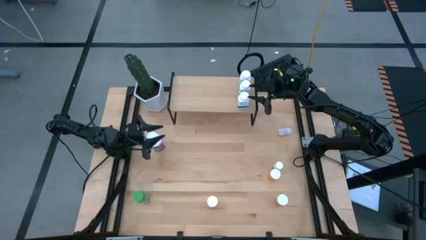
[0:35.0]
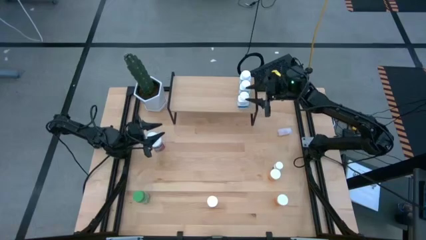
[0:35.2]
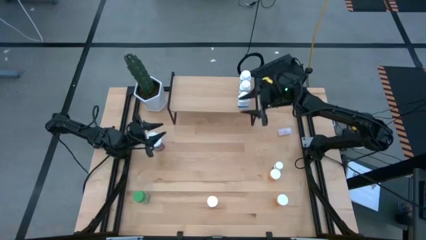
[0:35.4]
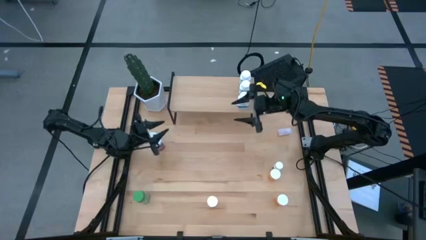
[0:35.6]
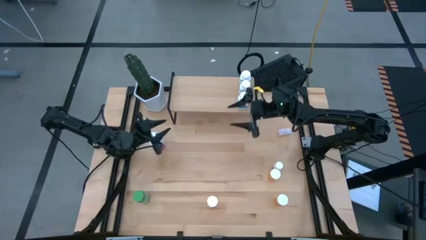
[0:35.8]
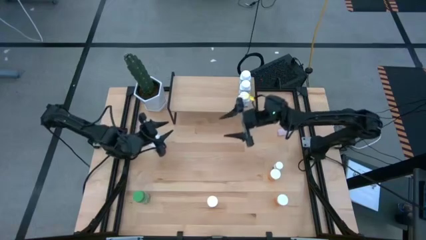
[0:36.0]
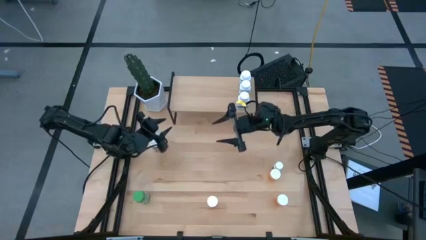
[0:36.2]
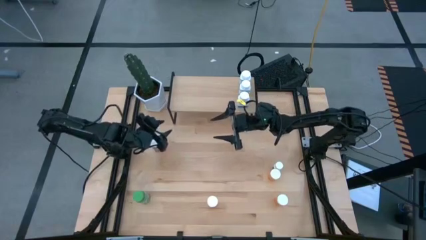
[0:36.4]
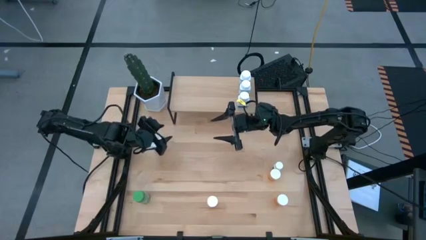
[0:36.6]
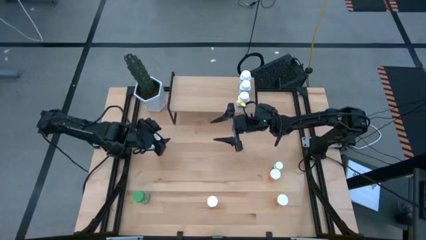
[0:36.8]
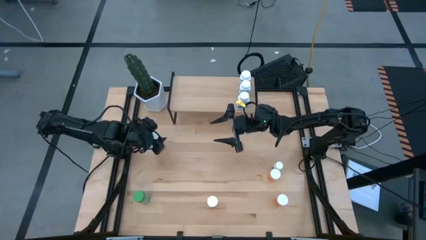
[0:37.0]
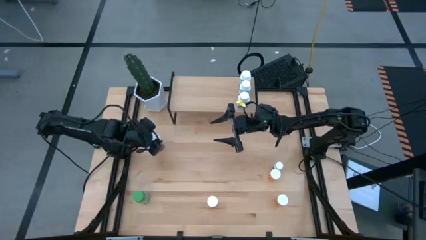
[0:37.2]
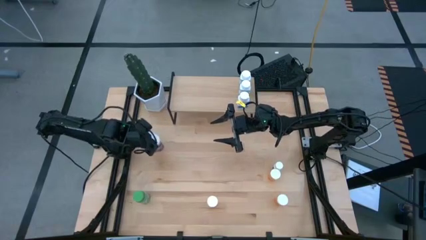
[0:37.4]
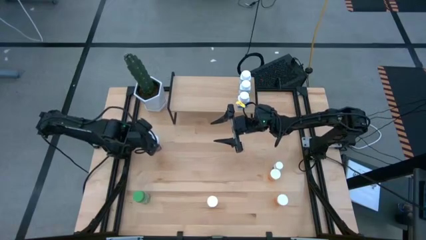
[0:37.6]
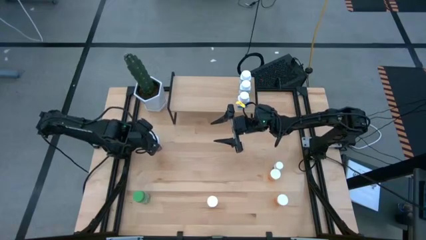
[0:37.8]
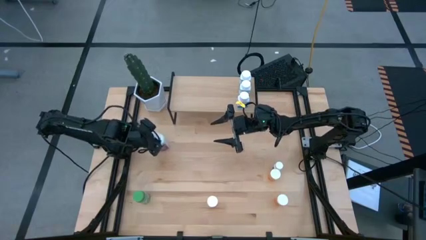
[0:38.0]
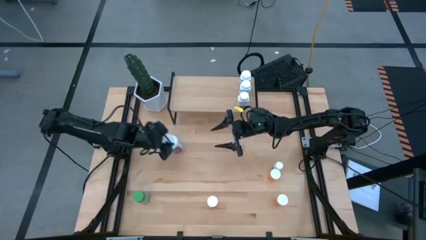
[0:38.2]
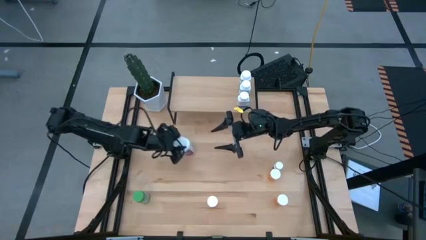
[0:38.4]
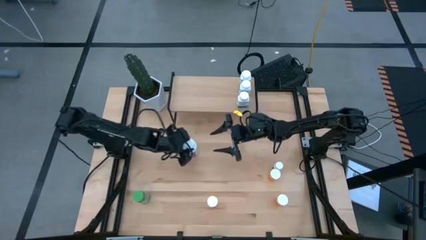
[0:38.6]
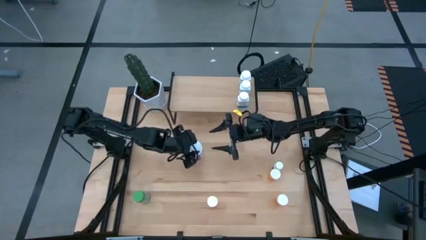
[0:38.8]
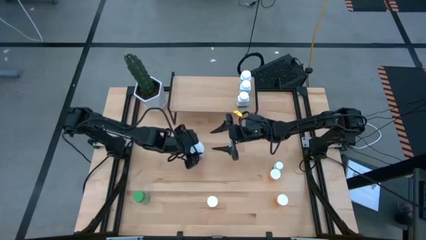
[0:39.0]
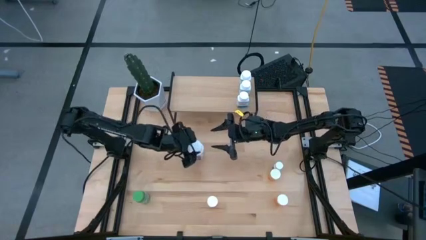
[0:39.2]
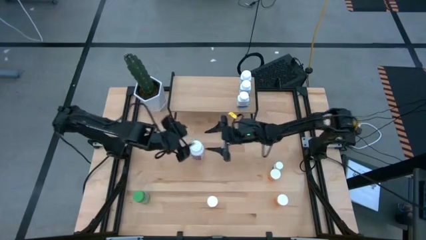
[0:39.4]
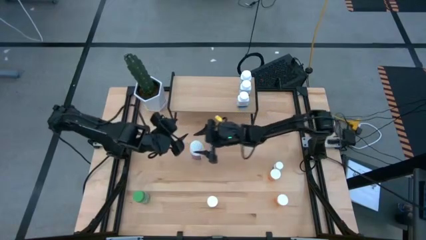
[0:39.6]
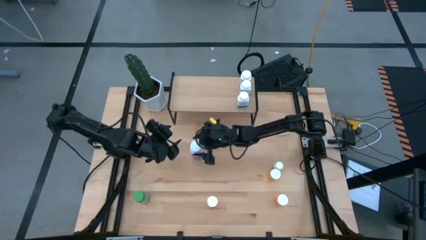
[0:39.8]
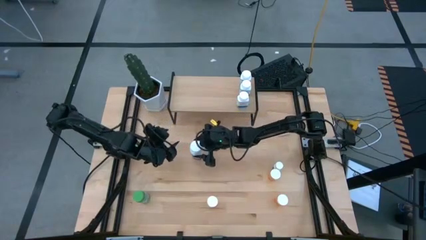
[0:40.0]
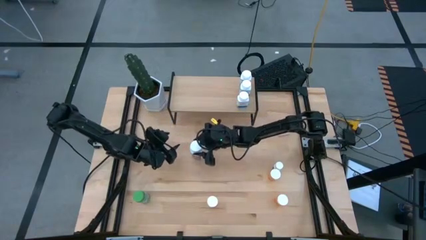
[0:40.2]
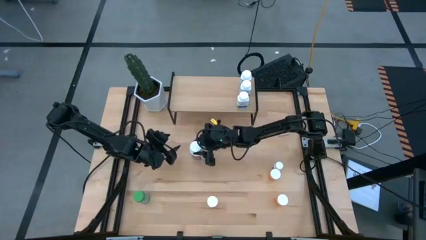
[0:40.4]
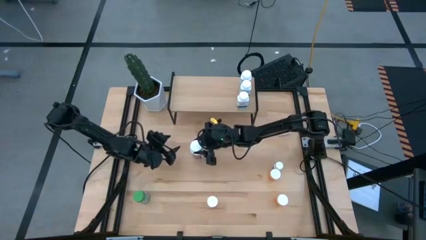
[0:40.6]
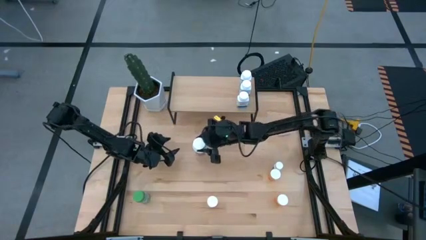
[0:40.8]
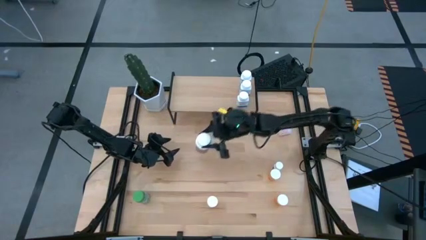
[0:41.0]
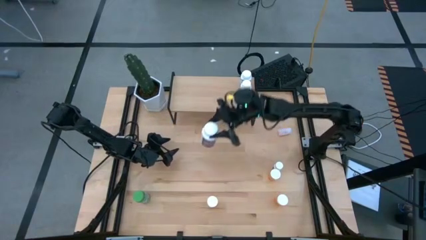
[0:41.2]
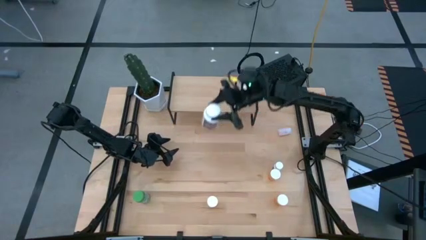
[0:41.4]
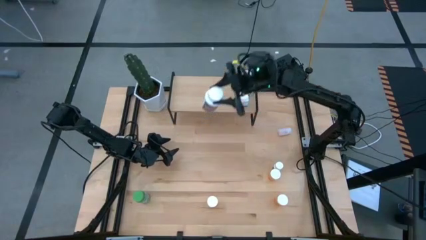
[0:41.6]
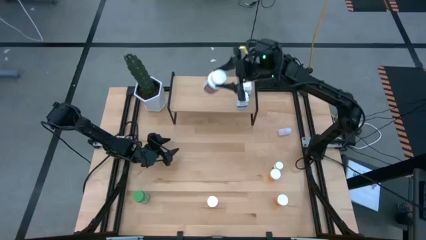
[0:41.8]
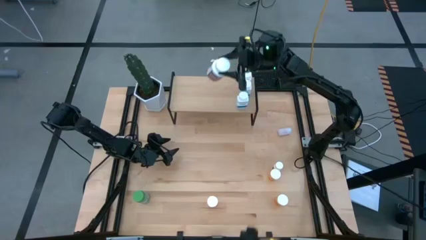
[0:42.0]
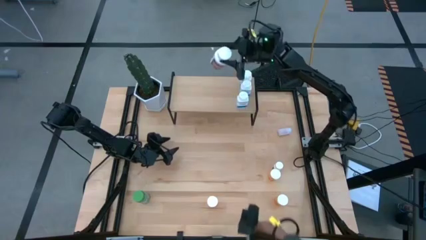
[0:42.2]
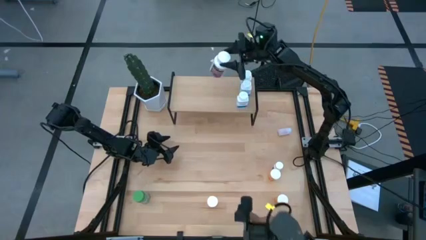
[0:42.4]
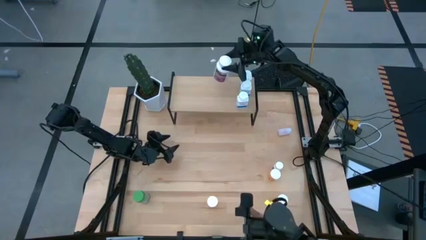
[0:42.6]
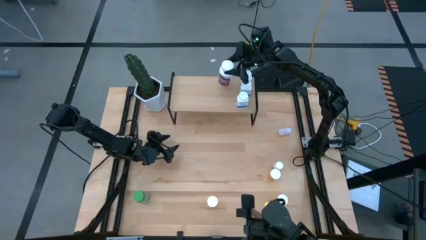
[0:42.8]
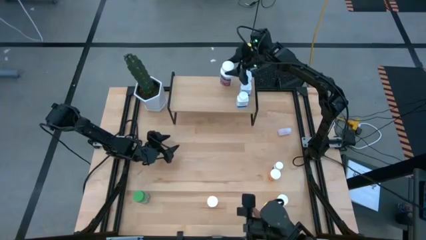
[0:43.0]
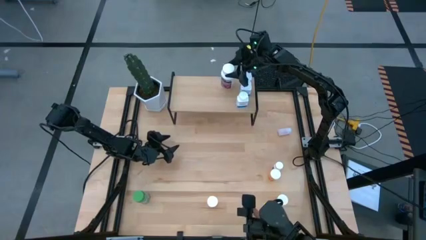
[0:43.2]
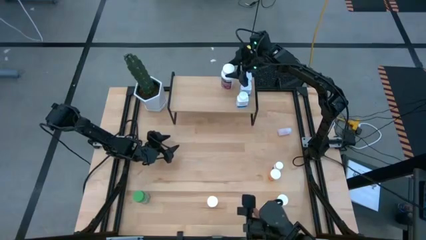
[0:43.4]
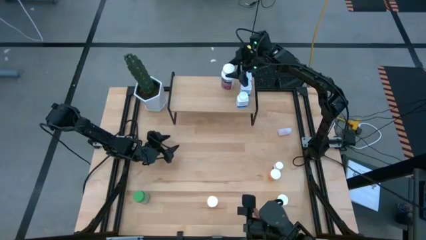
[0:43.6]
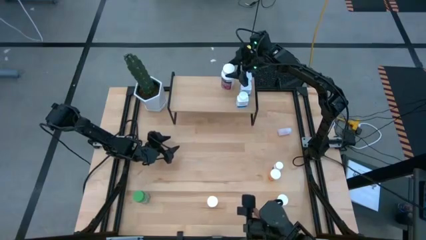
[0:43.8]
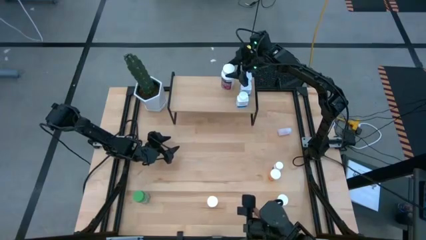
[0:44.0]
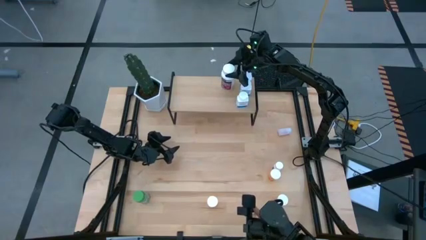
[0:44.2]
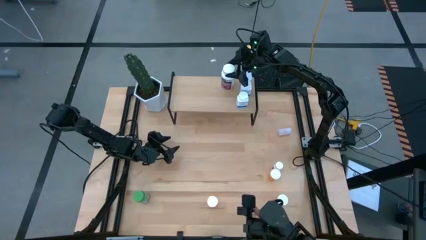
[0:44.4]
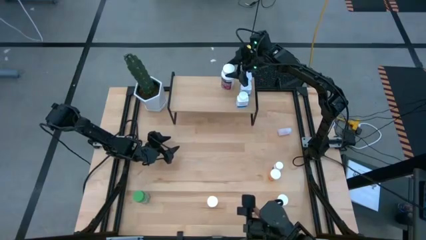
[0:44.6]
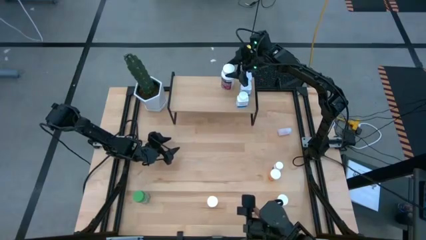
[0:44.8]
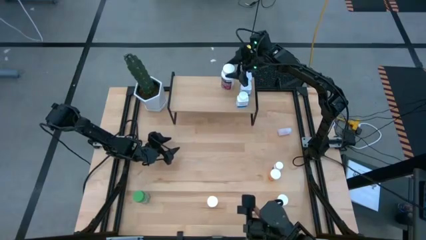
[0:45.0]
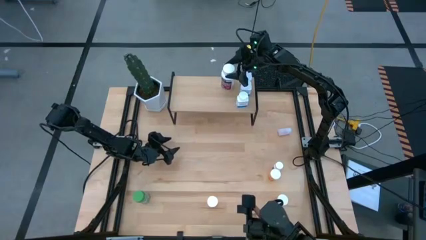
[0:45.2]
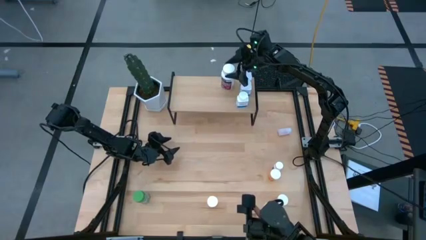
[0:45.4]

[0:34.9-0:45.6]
Task: Pick and place medicine bottles onto shelf by color
Put the white and purple pill bottle on the shelf

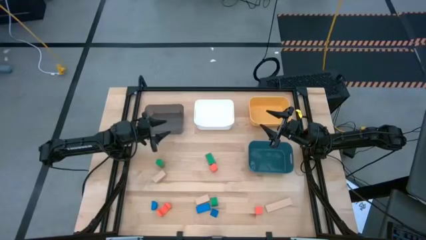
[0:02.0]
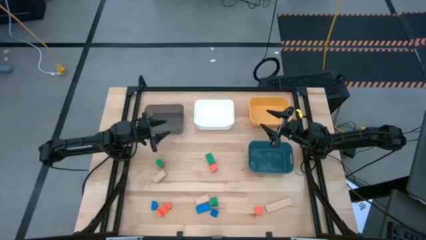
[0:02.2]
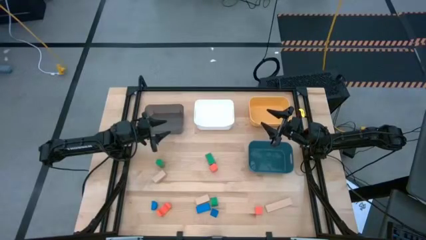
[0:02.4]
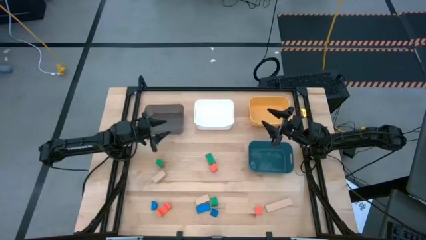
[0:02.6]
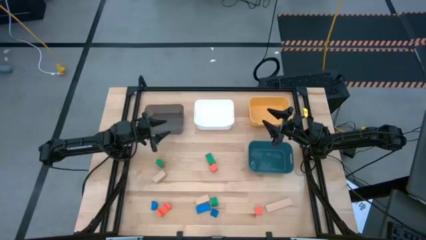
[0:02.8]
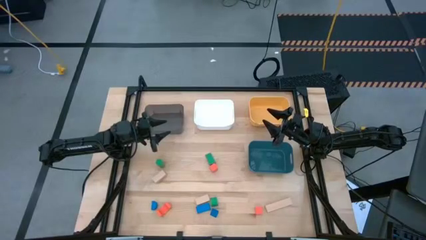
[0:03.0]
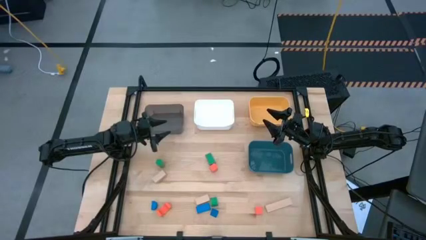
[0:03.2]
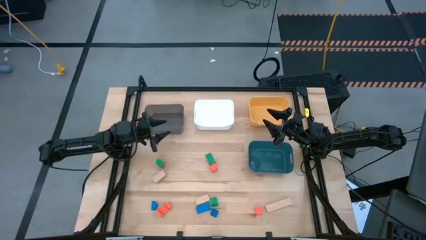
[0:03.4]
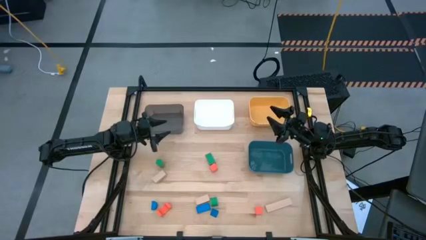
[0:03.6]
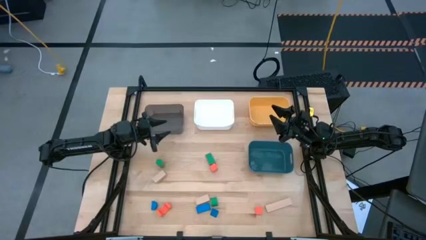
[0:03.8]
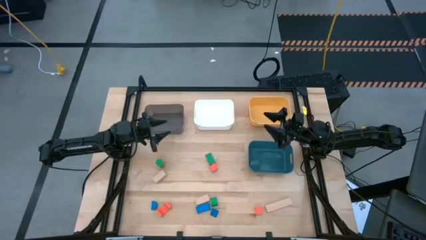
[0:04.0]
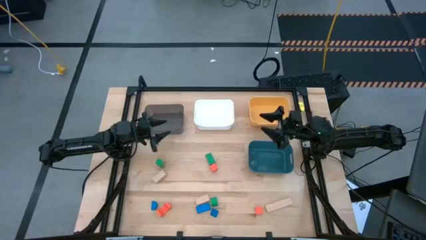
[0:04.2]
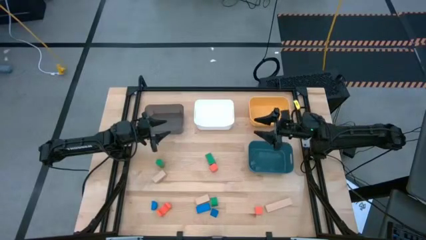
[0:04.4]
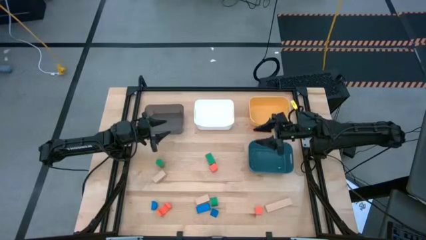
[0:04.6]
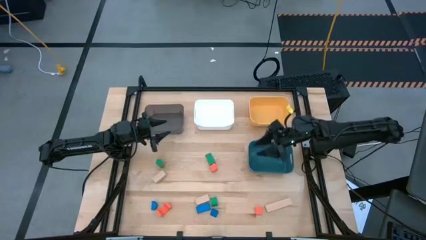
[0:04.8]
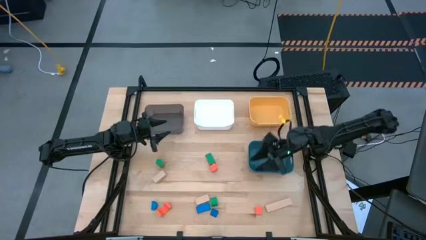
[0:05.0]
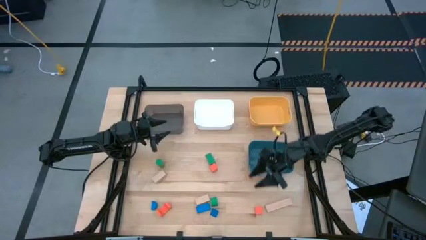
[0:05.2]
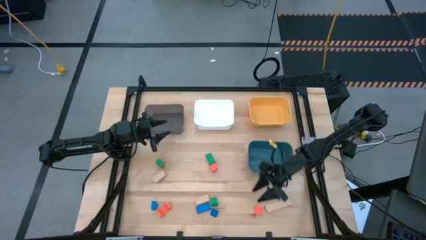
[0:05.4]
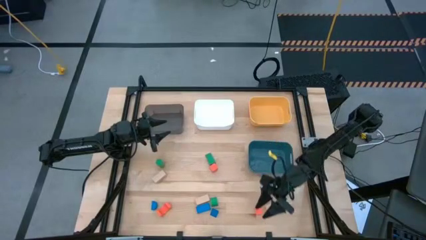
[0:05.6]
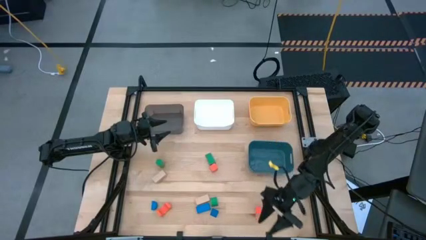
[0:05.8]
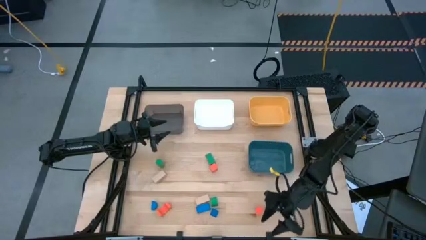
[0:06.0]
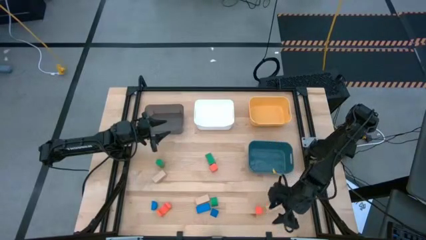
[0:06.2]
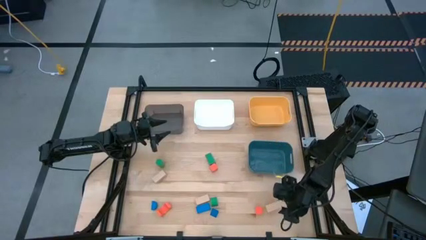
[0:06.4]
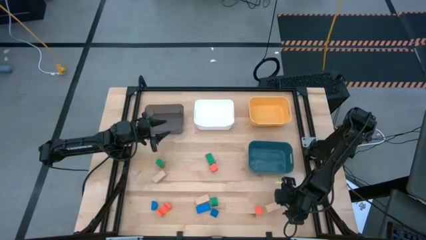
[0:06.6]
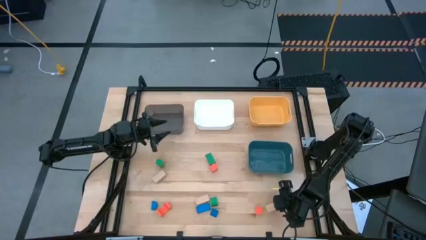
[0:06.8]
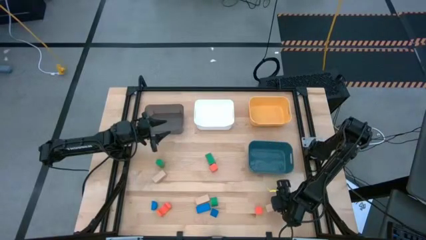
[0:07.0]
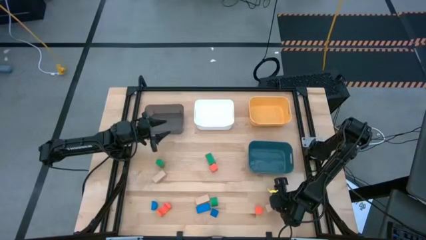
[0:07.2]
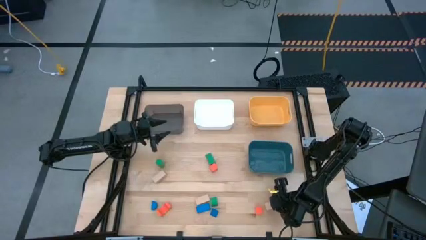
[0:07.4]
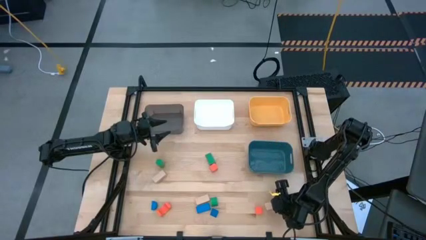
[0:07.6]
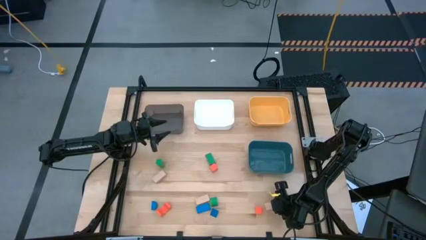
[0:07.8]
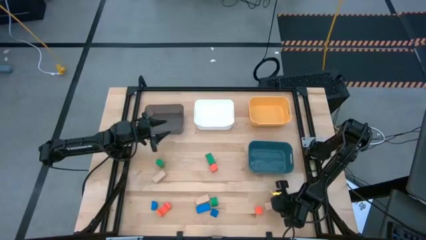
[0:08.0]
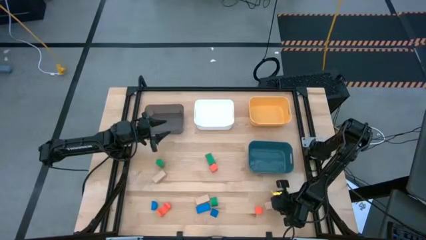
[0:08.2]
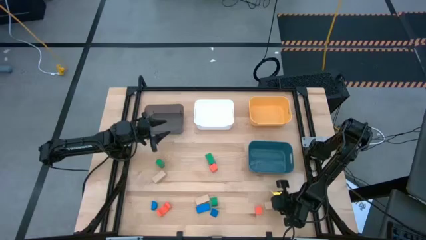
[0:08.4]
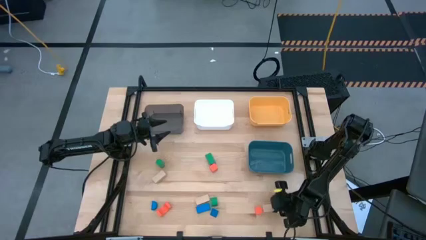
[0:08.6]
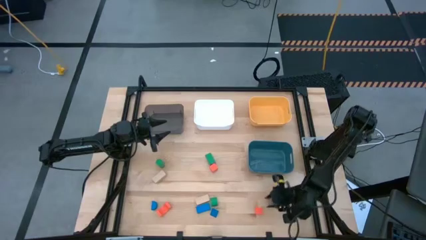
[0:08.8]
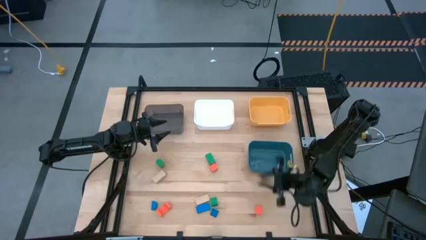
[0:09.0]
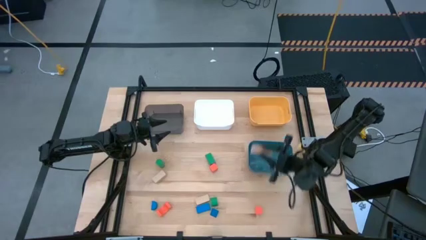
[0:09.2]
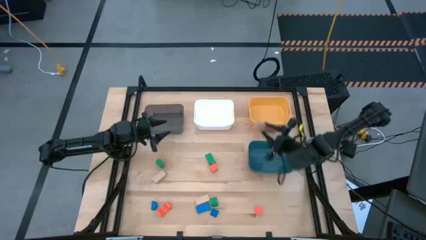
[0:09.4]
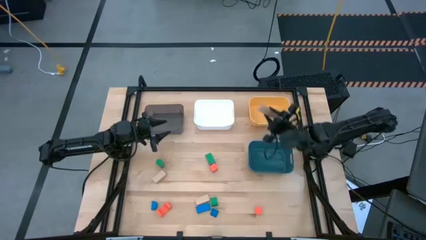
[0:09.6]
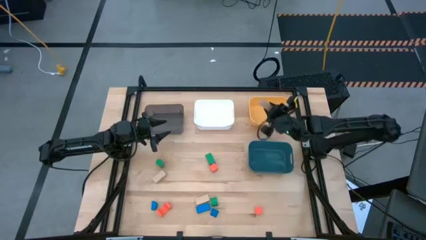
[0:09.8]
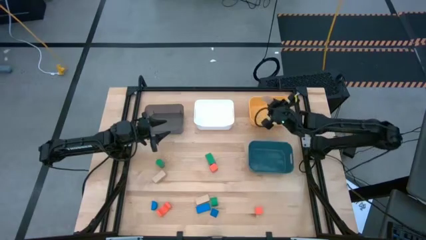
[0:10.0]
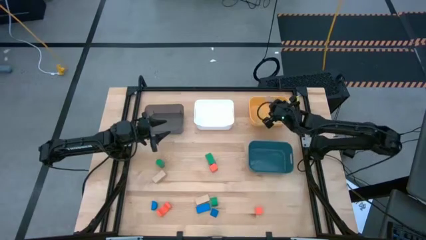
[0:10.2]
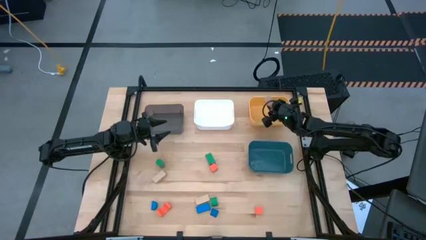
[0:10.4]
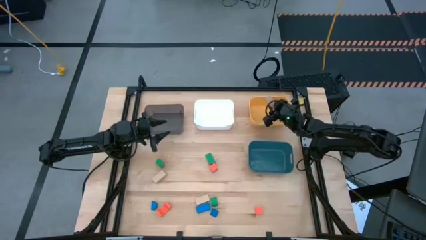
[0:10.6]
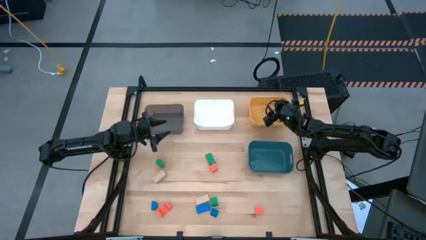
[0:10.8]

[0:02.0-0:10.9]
Task: Sort & place blocks by color
Put the bottom right brown block into the yellow bin
